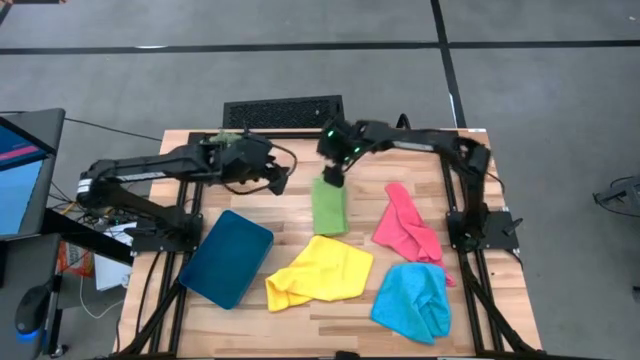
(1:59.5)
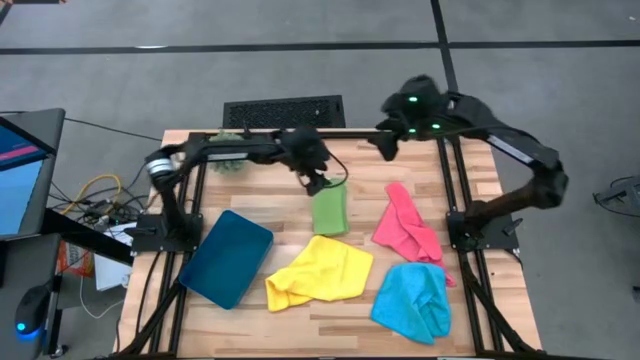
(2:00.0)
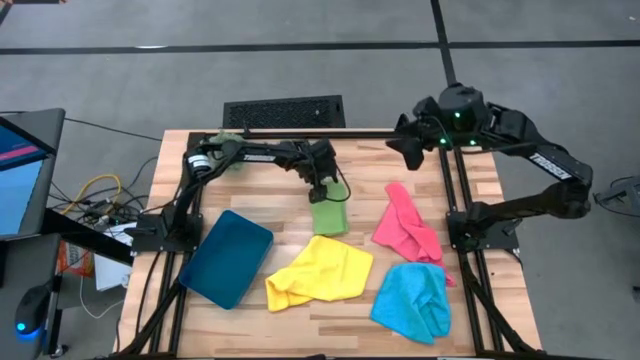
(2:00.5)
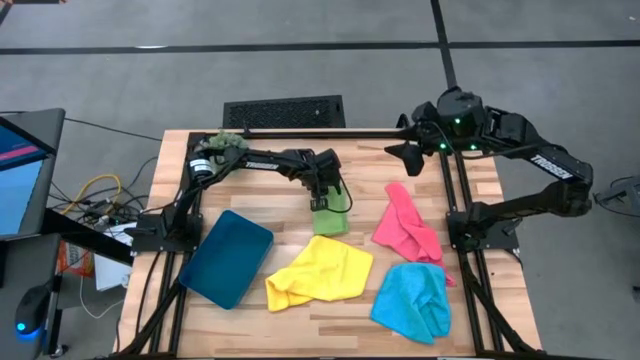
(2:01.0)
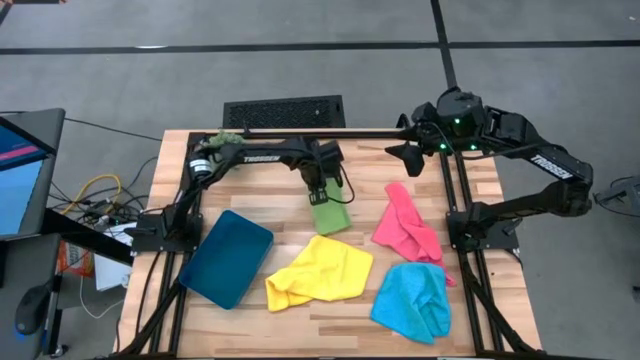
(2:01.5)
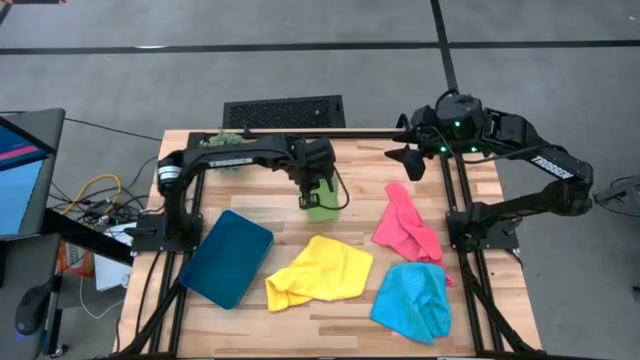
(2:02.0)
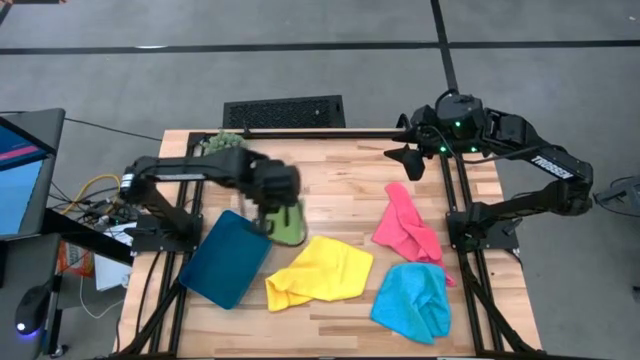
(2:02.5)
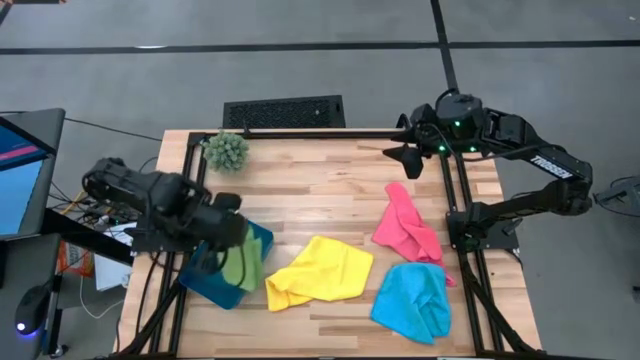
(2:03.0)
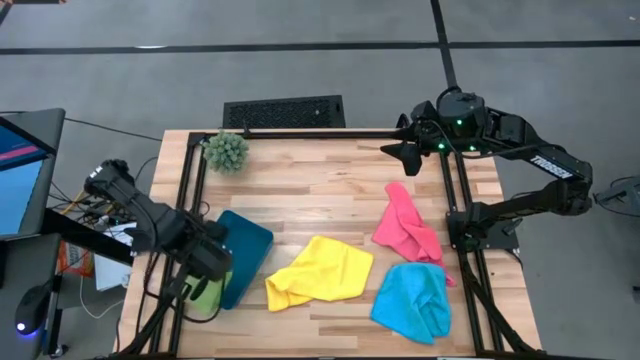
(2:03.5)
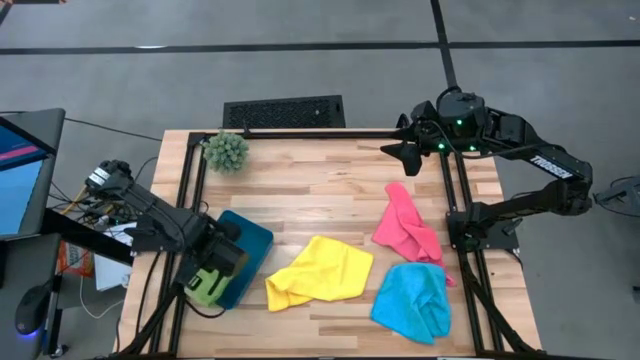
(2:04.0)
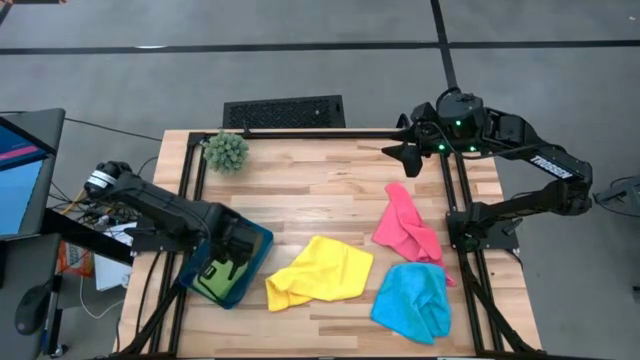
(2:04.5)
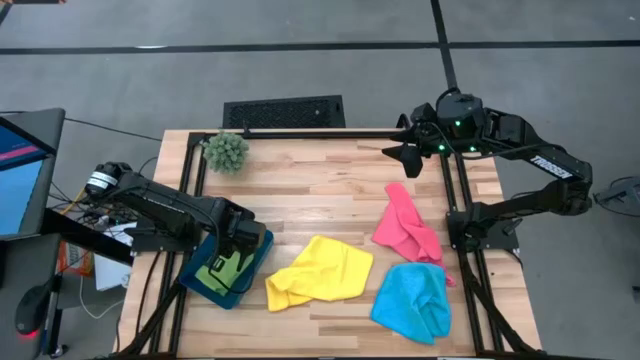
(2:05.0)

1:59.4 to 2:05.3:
Task: Fold microfiber towels
Put the green microfiber towel into the blue bin

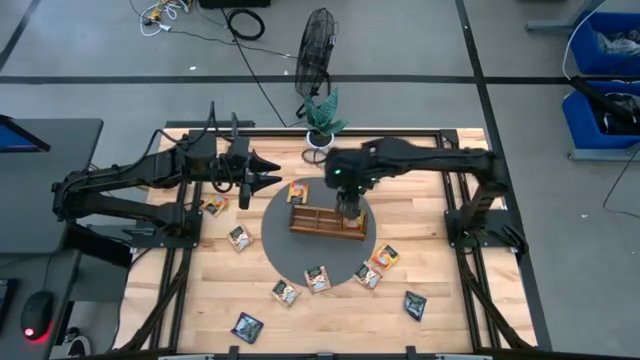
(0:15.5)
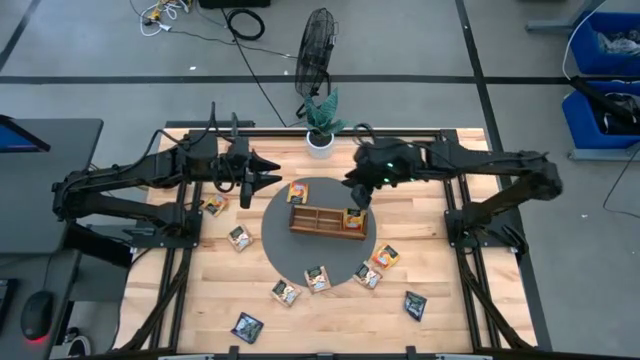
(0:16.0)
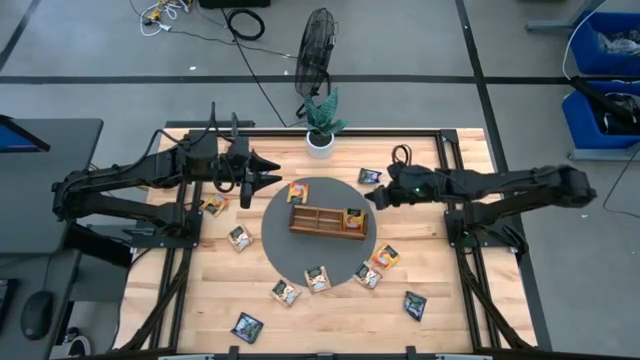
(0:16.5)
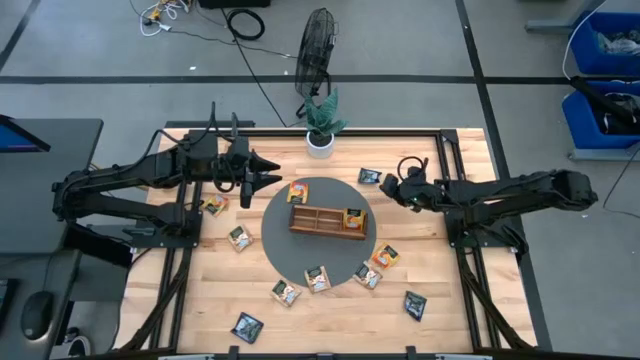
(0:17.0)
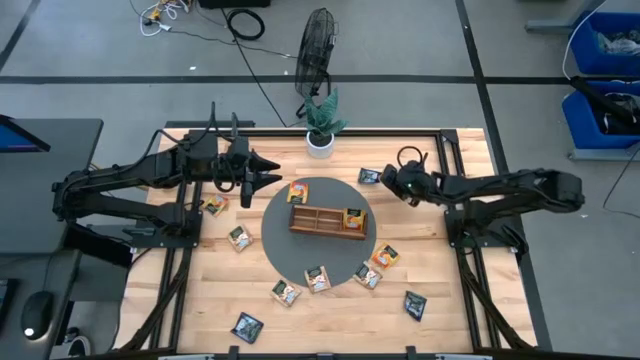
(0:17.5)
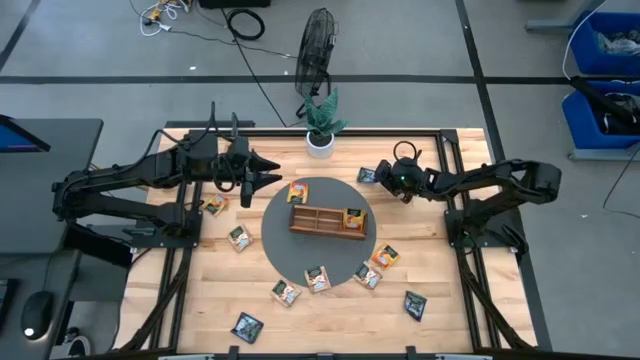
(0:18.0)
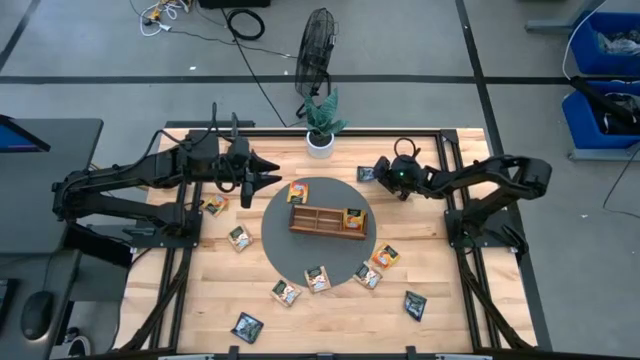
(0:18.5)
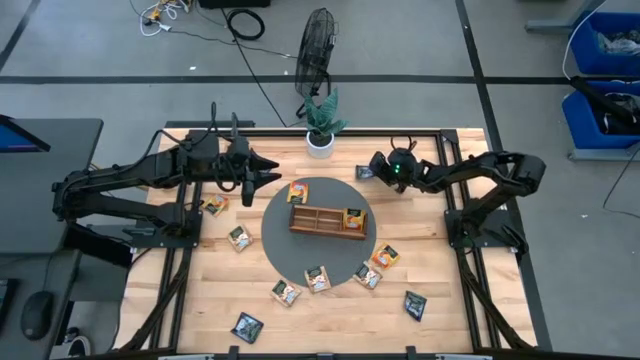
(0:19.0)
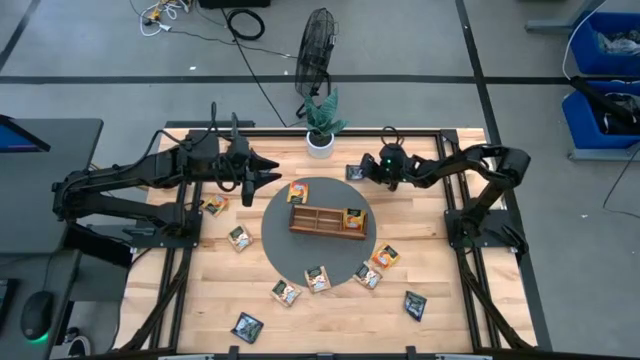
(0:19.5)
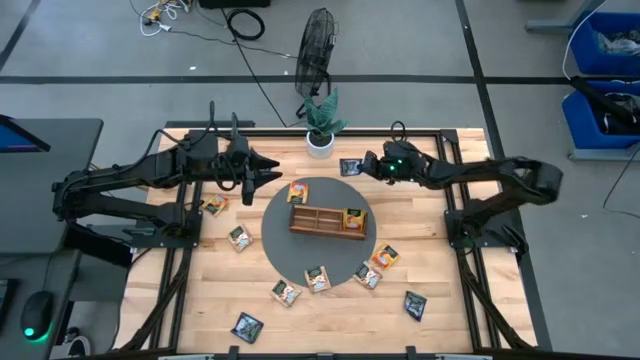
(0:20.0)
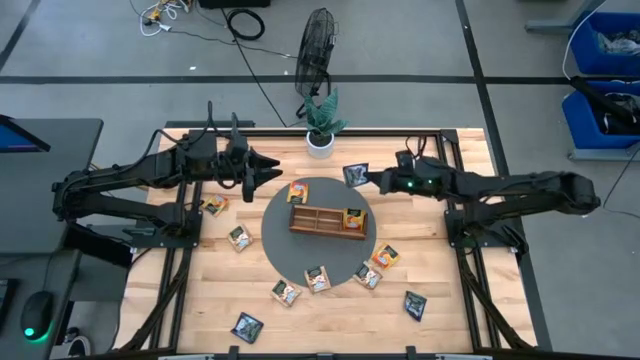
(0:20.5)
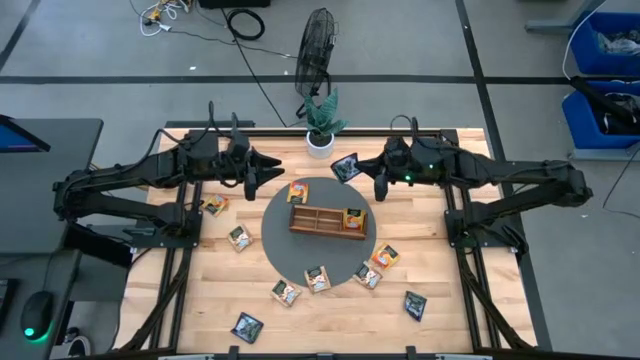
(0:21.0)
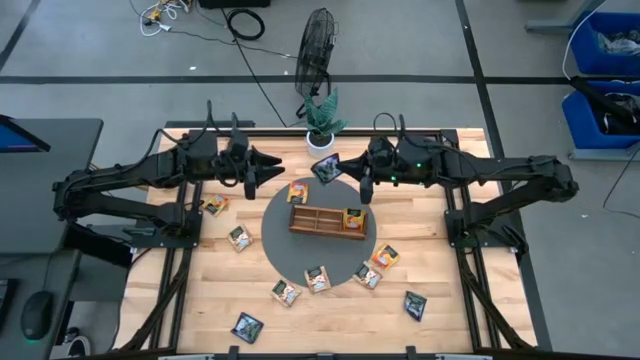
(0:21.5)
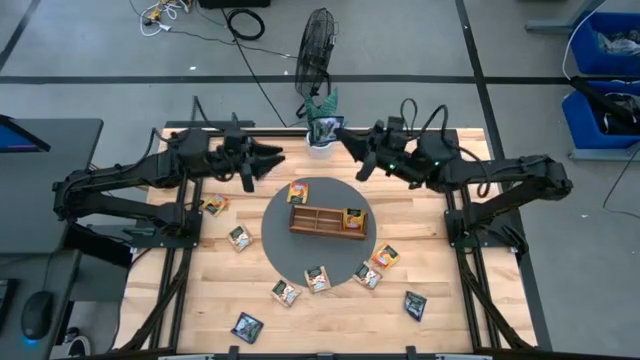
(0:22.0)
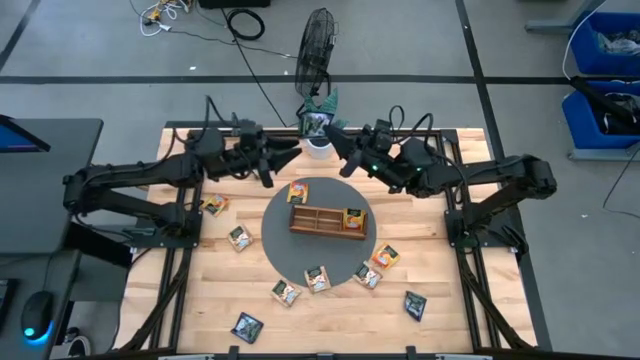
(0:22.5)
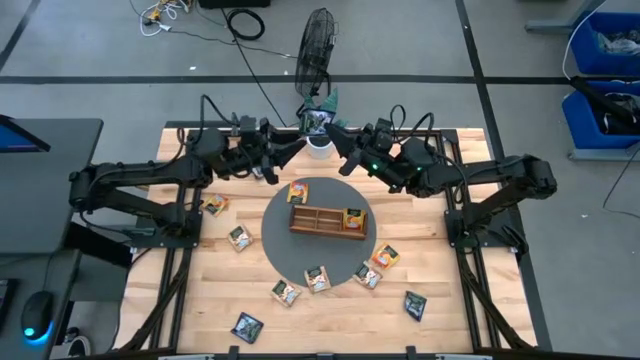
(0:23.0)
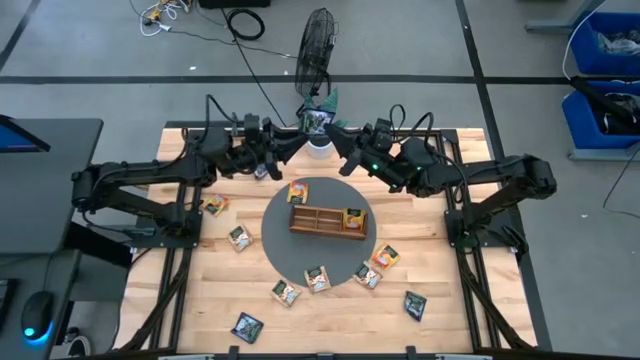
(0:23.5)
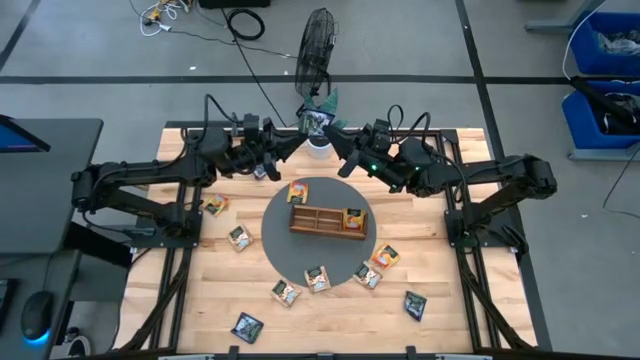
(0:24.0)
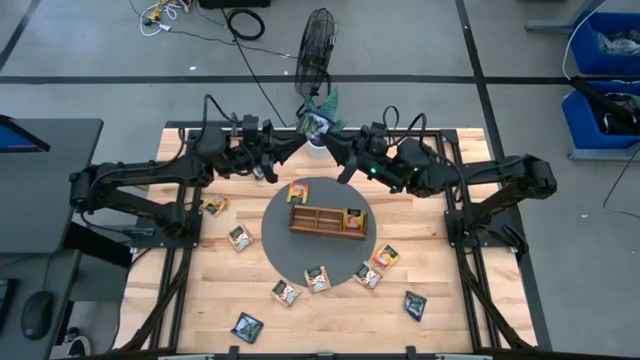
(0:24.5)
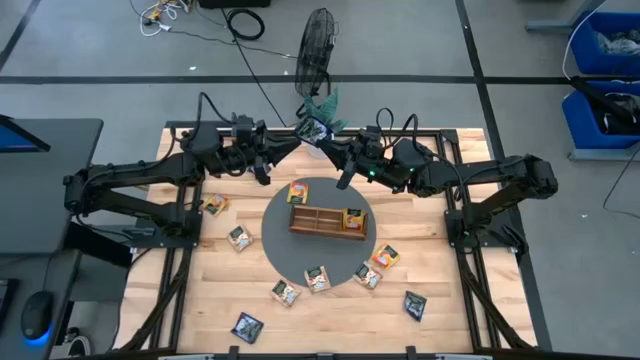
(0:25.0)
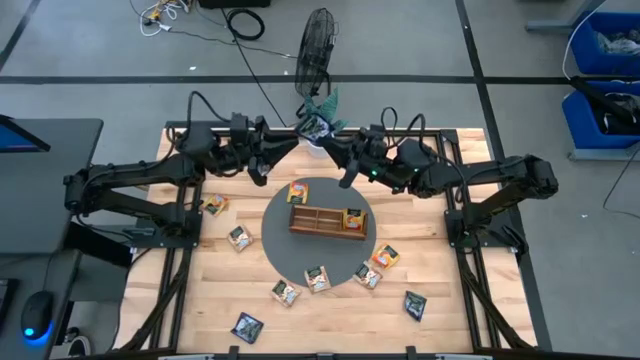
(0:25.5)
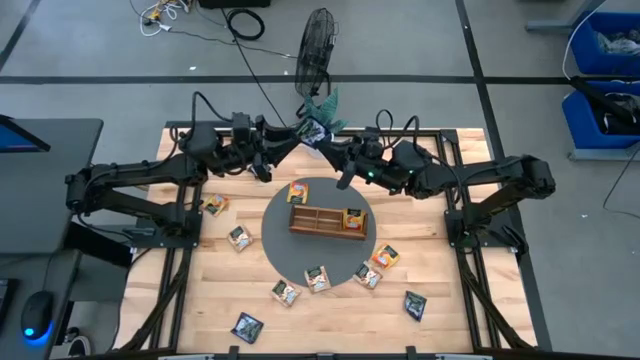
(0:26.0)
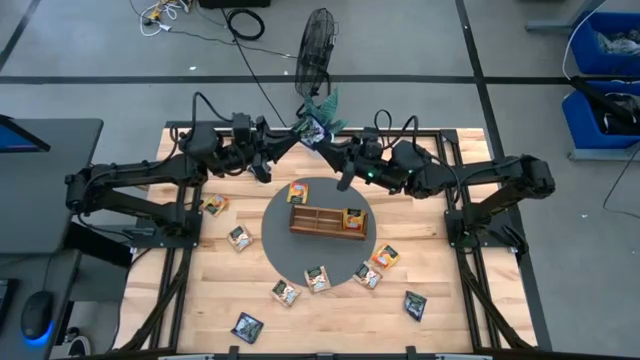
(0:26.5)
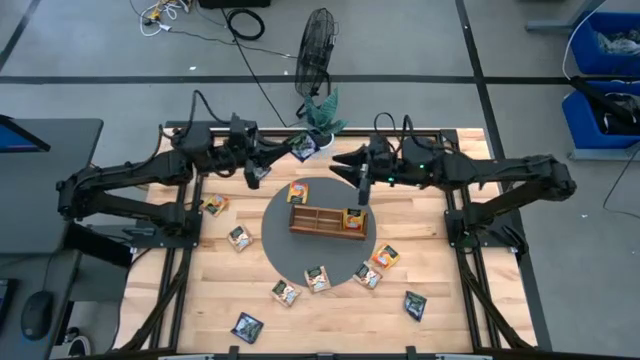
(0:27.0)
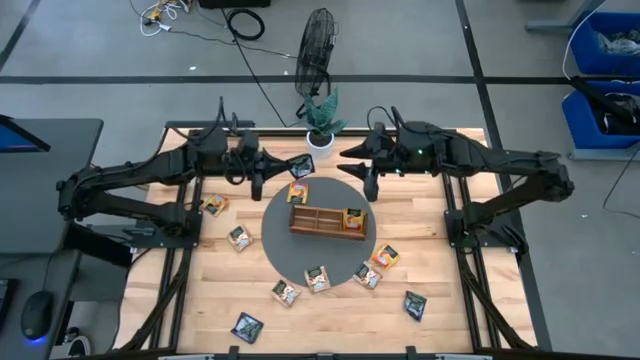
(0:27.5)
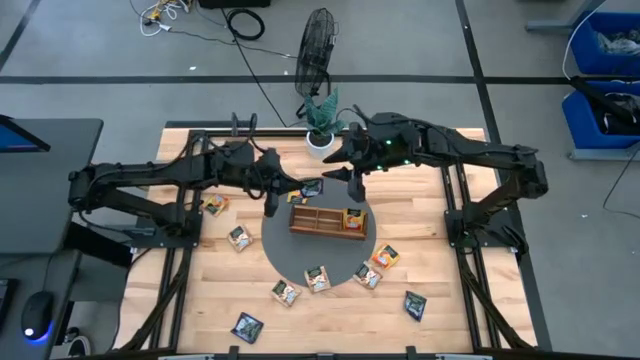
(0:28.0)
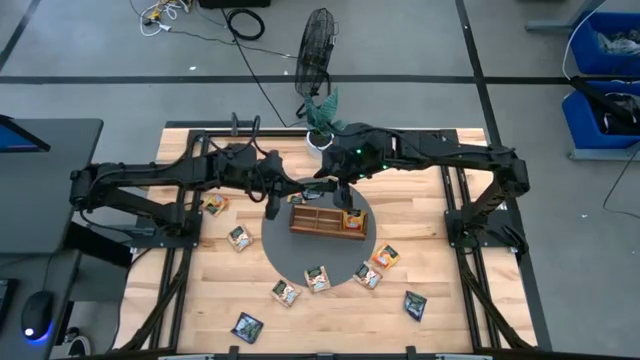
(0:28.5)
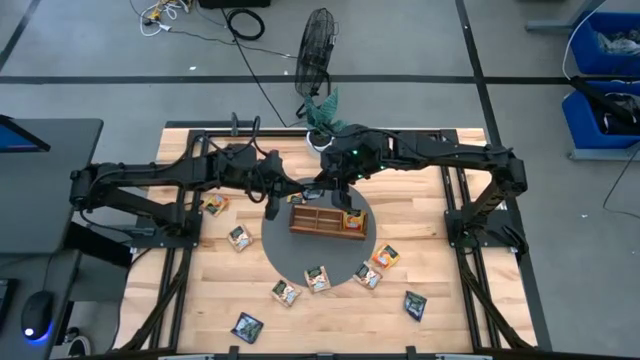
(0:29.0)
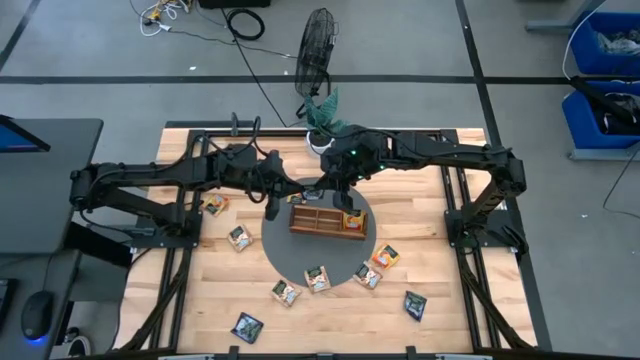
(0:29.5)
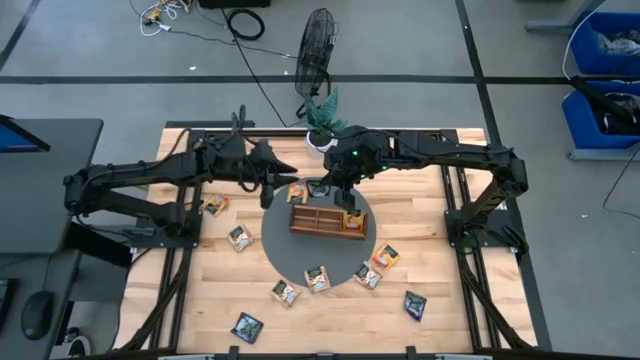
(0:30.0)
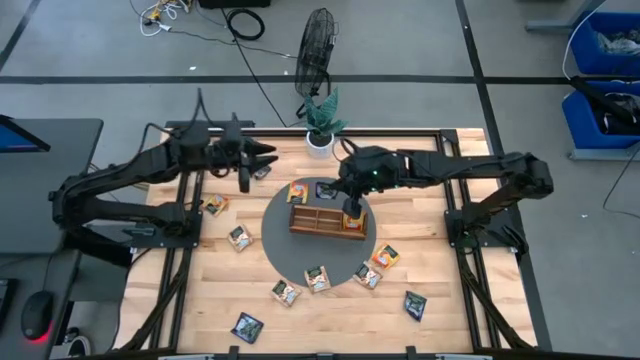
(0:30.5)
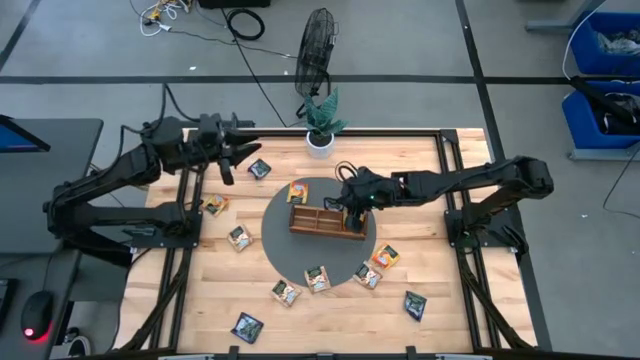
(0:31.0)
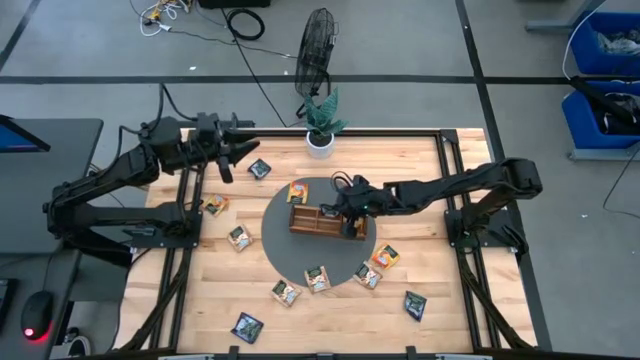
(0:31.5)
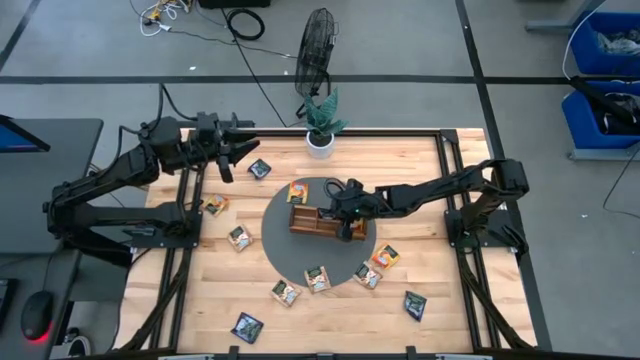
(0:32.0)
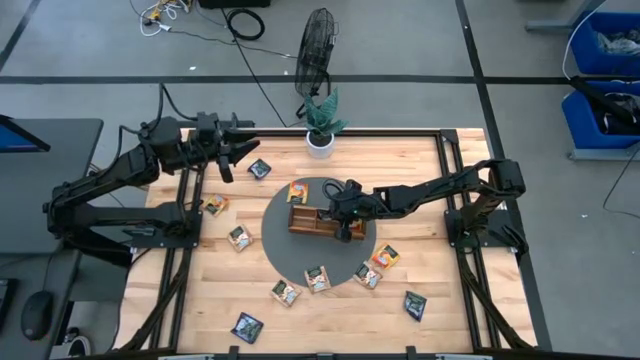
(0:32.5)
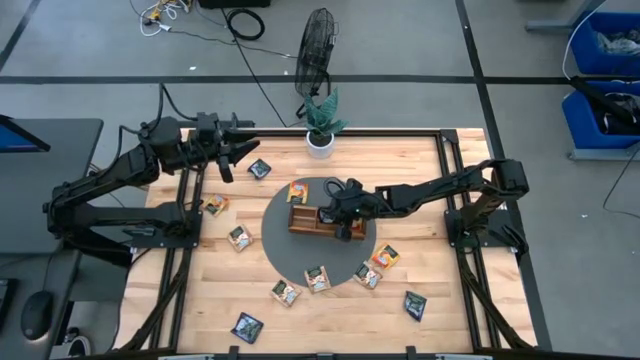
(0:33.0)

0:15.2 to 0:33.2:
Task: Pick & Place Tea
Put the blue tea bag into the middle section of the wooden organizer
